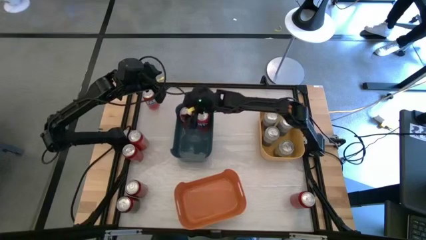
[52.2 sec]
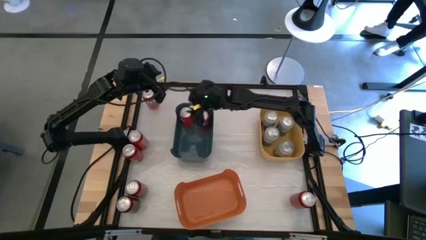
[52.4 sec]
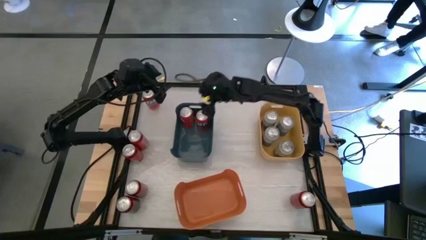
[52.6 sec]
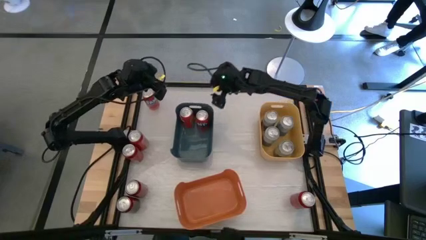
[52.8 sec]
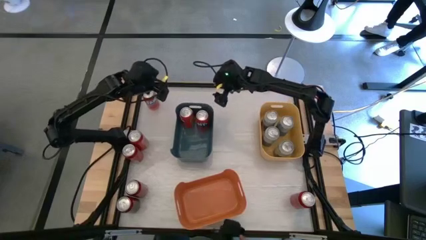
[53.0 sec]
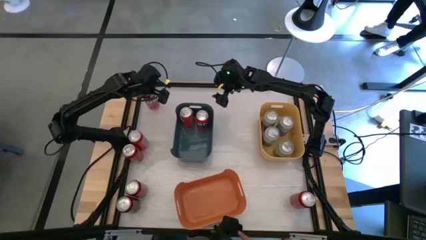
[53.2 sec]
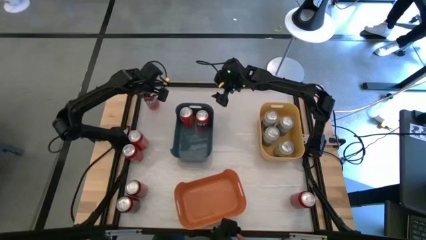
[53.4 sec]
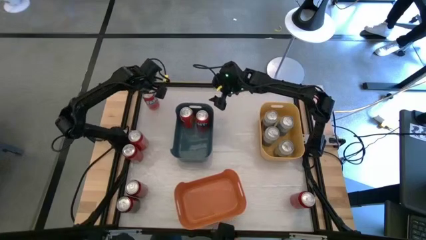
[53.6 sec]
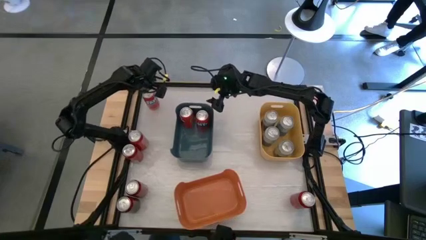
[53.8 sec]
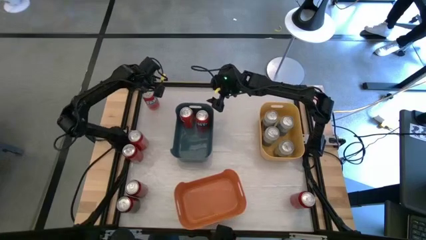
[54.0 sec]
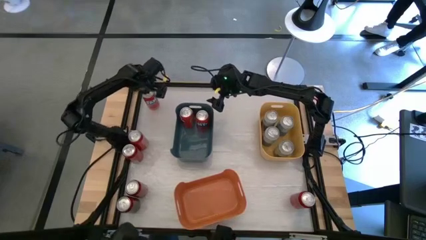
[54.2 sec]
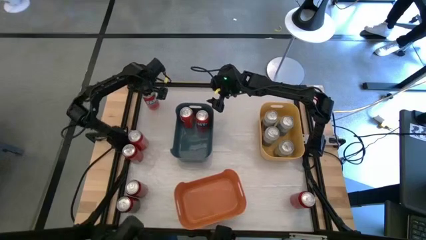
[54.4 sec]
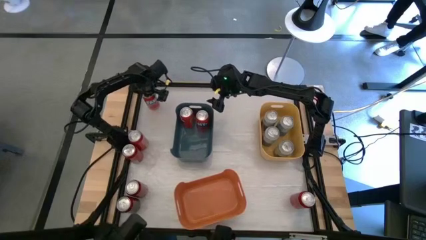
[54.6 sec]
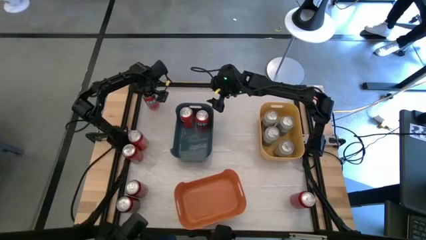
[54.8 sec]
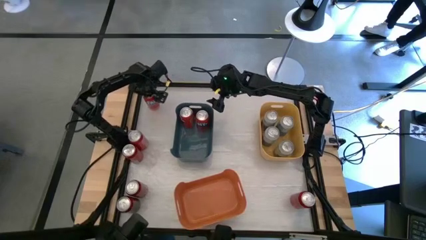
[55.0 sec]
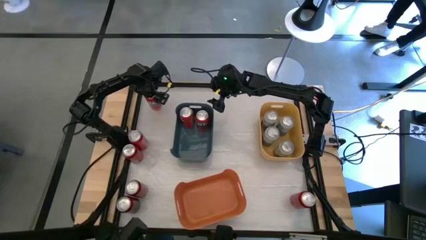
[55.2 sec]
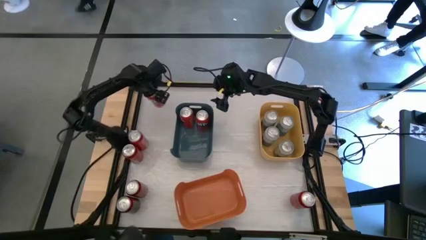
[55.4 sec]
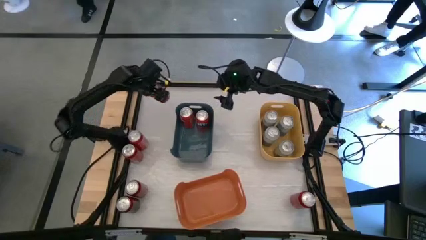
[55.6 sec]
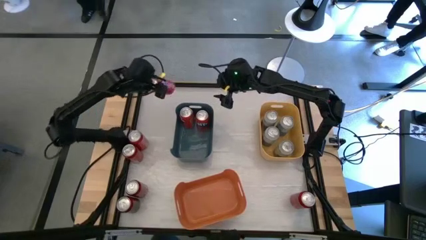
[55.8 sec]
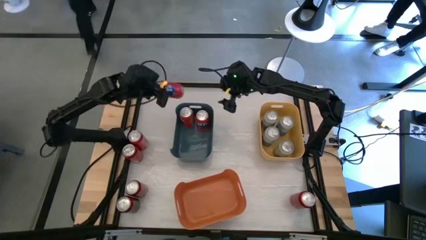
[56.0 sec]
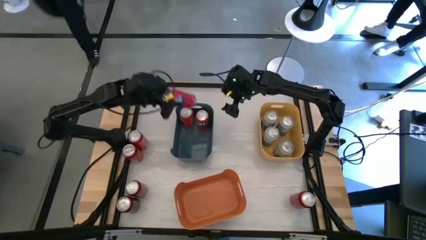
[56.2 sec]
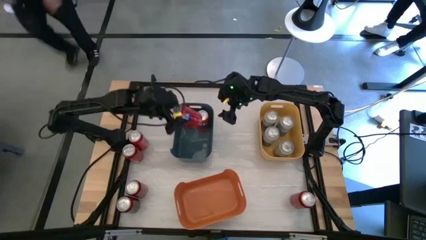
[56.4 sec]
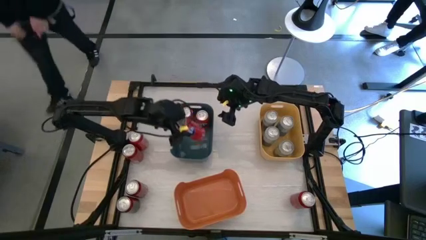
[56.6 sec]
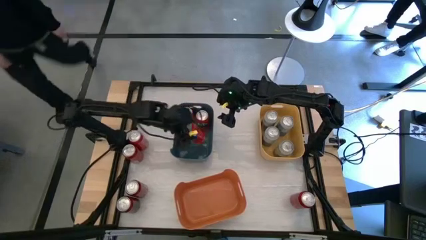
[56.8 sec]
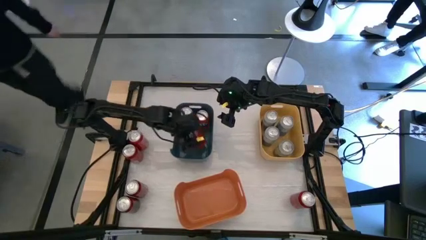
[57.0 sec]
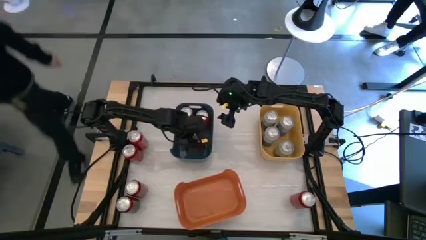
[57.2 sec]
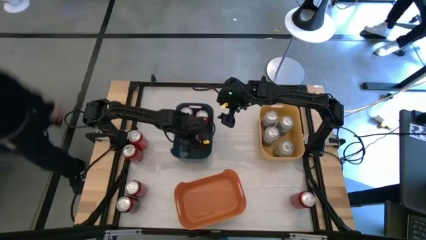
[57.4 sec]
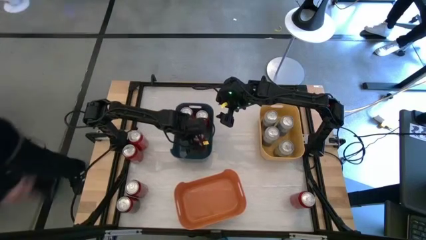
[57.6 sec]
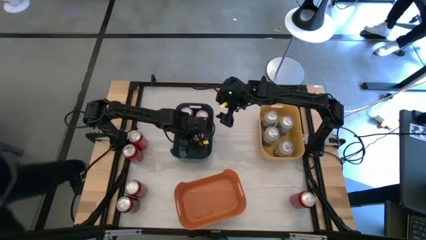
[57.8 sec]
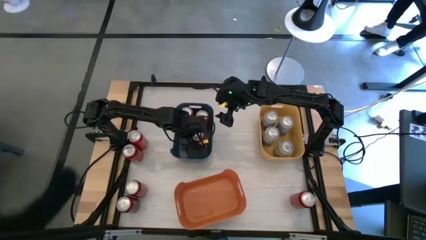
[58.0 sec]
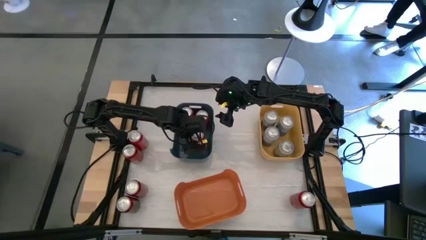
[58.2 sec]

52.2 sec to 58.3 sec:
Task: Sort soda cans
Put the top orange soda can into the blue bin

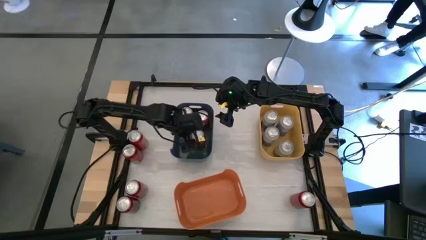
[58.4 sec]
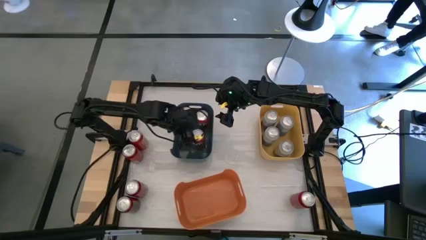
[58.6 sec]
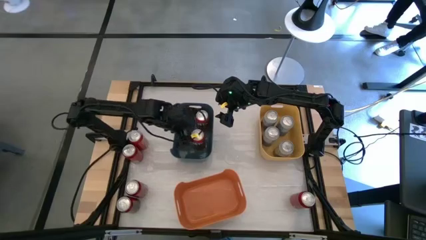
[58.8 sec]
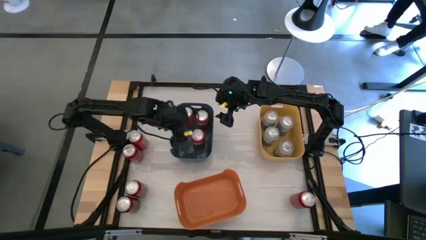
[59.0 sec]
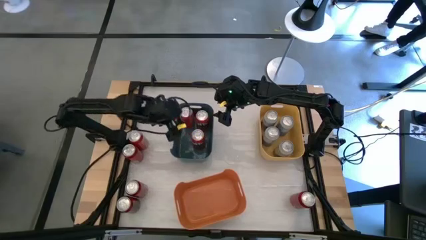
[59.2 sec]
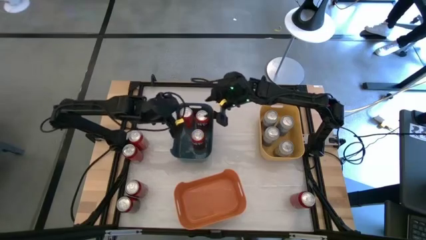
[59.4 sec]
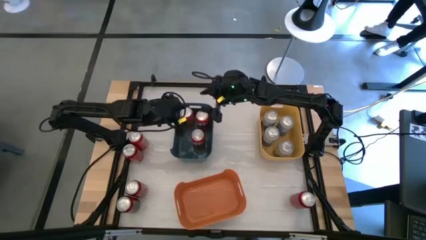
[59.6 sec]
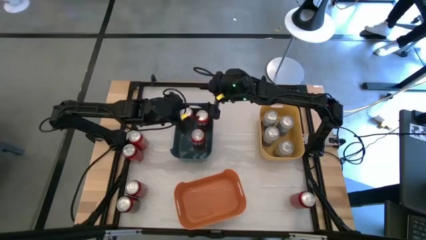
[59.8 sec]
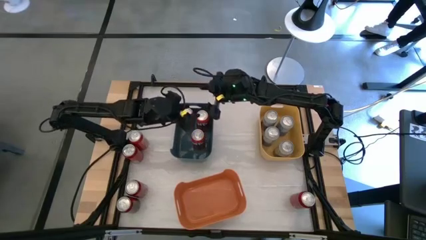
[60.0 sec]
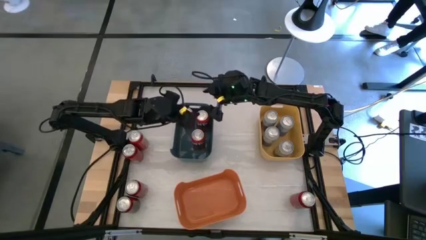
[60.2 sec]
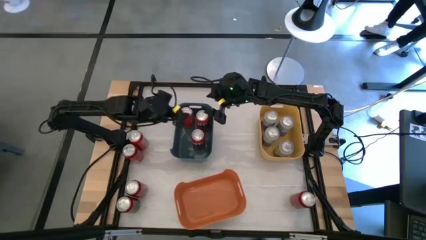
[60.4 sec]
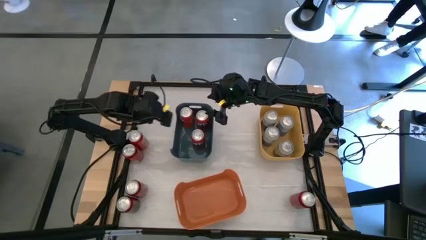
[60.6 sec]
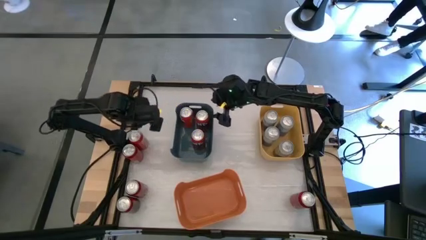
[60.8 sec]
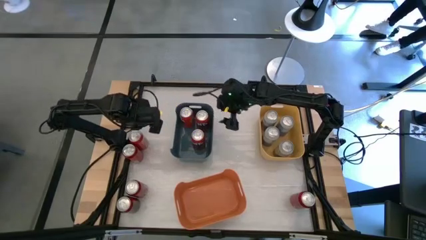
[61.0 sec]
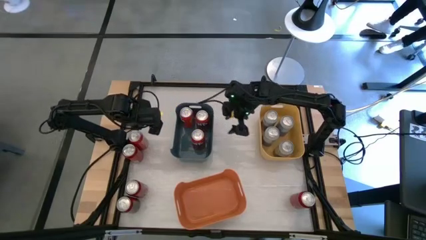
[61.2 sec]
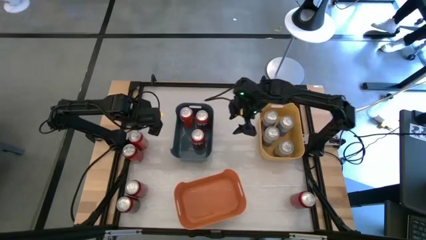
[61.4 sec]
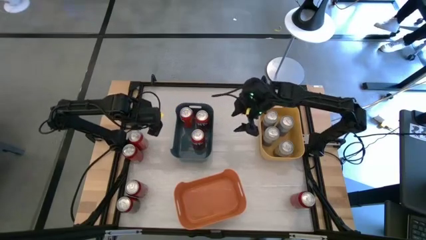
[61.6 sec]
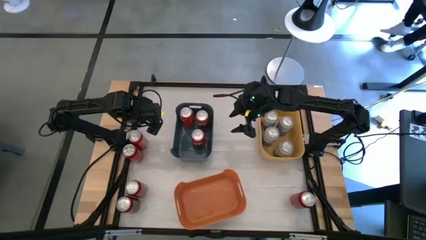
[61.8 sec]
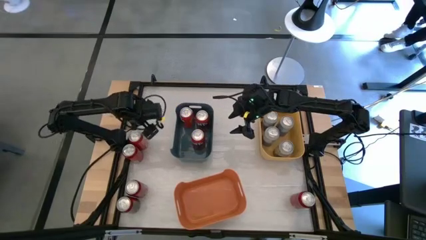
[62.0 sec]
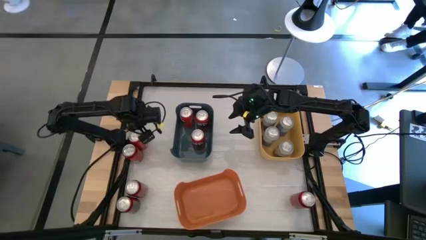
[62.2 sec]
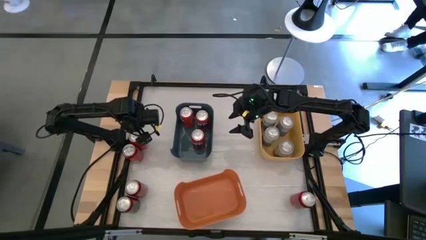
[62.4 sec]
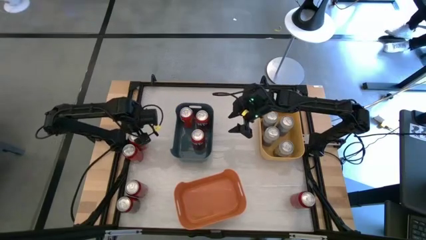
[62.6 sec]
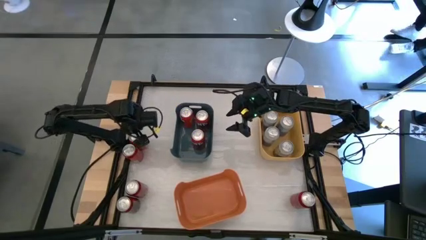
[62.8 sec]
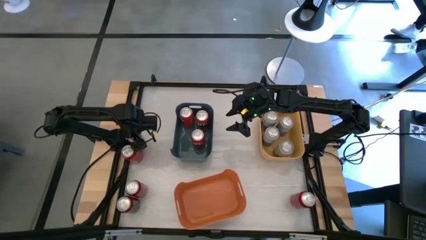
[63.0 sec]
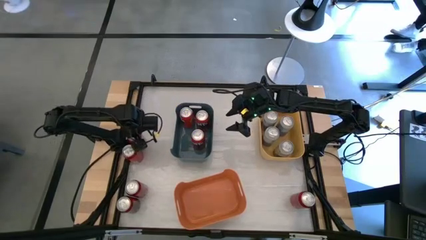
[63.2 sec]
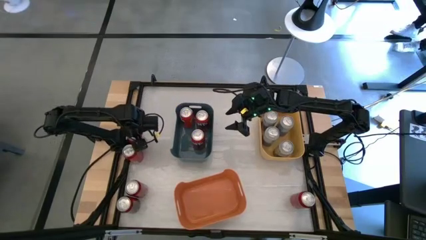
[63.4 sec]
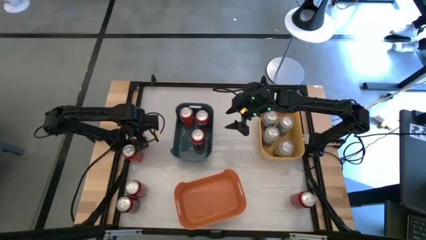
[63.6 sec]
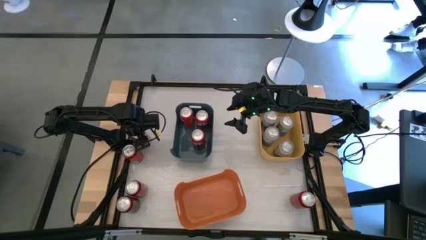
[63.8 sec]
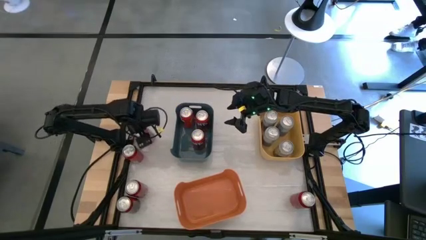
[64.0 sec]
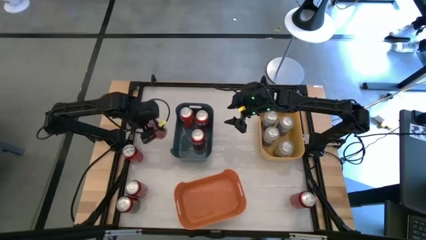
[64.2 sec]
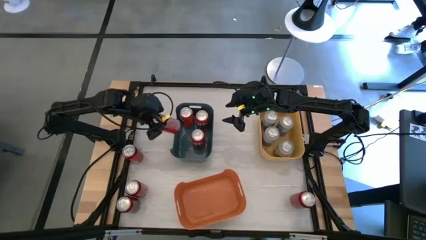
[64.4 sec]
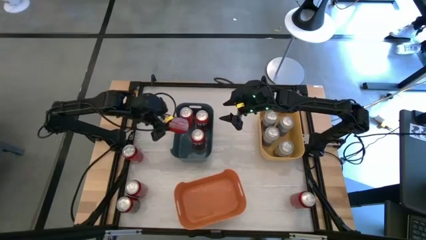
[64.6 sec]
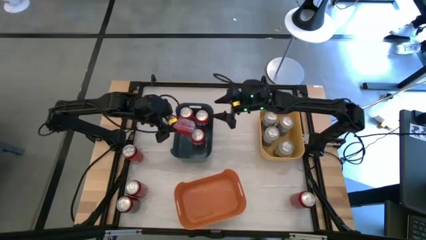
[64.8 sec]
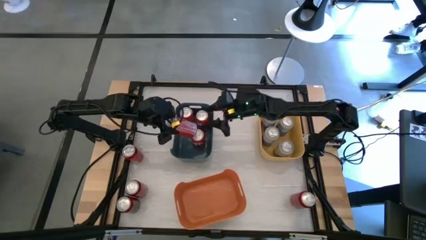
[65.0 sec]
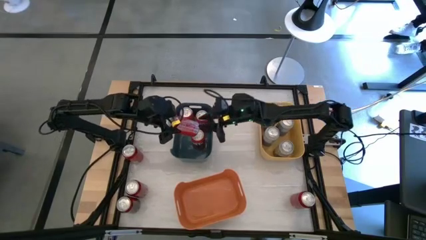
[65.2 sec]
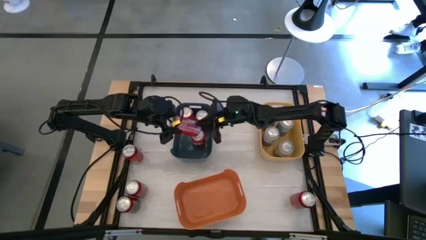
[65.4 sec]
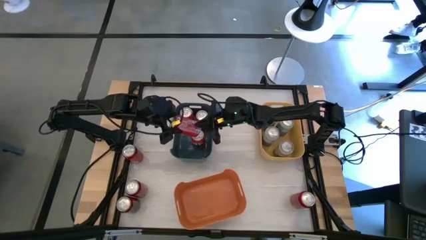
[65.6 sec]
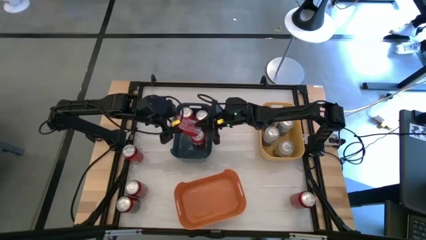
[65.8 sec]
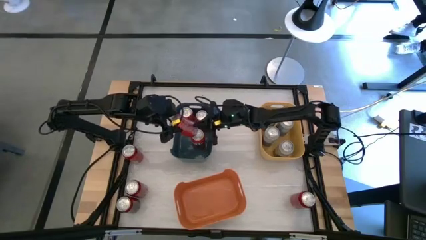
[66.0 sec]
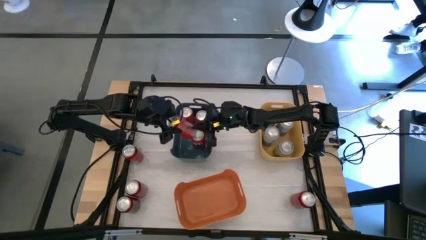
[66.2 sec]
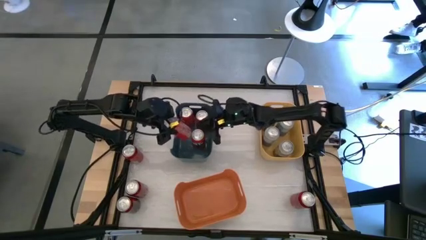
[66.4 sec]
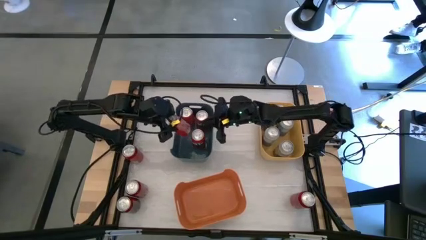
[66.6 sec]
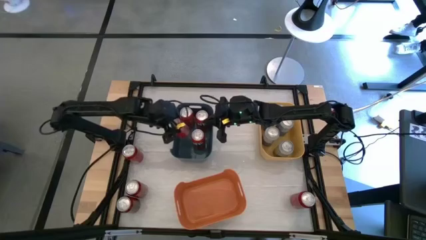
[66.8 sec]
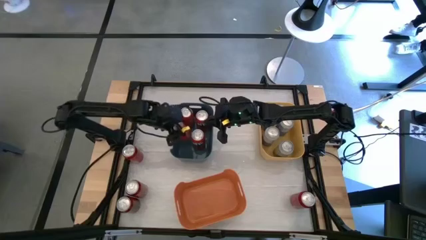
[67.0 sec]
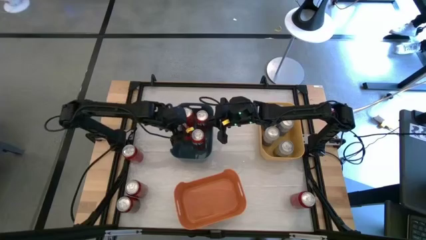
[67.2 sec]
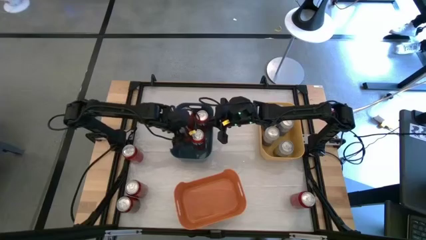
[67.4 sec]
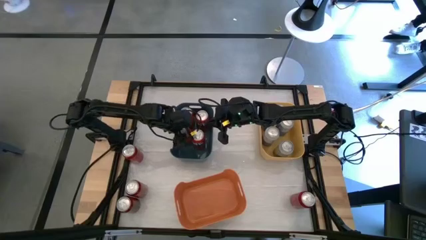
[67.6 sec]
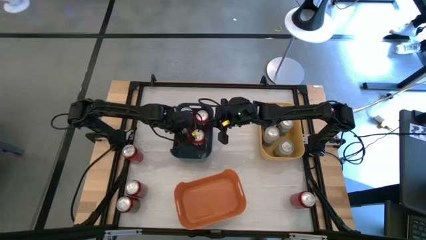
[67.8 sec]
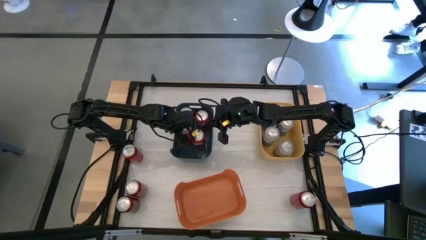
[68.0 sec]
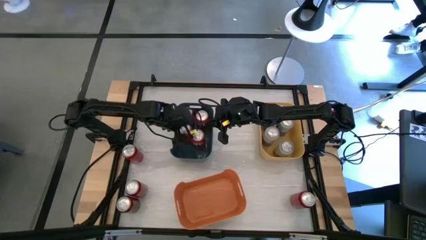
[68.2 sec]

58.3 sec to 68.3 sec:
Put the orange soda can into the blue bin

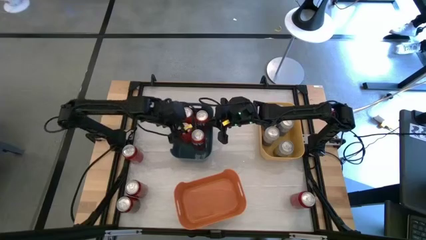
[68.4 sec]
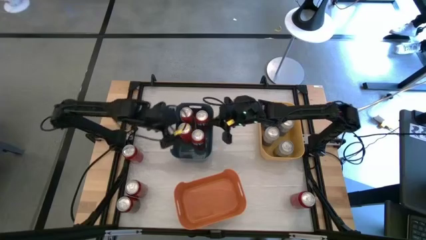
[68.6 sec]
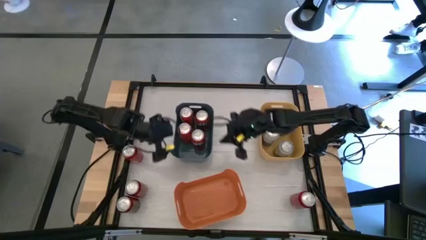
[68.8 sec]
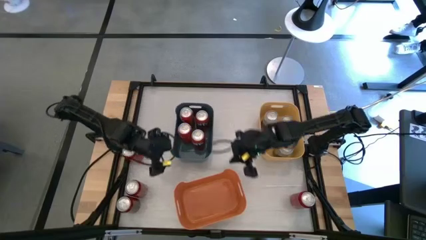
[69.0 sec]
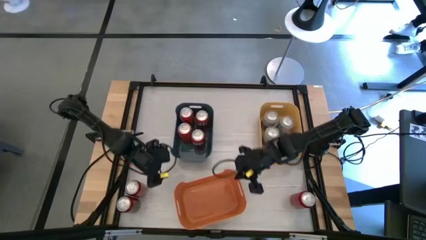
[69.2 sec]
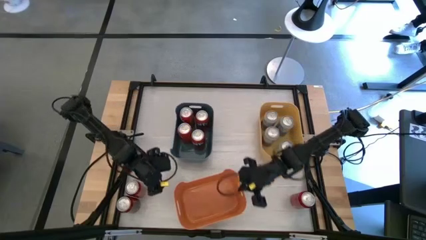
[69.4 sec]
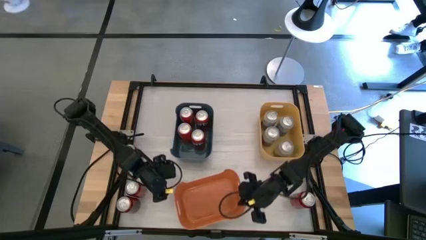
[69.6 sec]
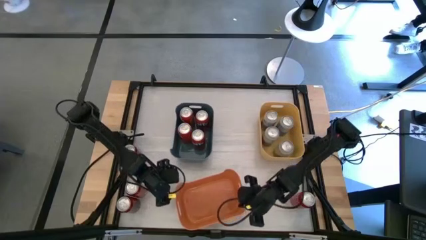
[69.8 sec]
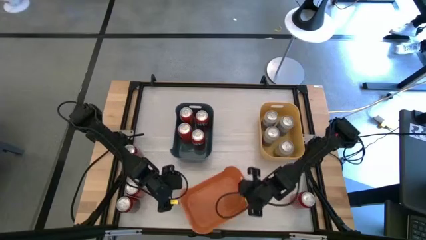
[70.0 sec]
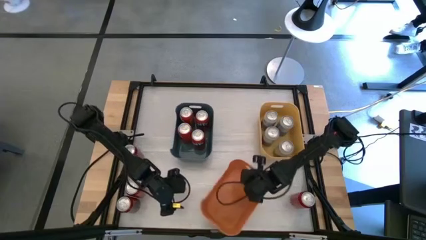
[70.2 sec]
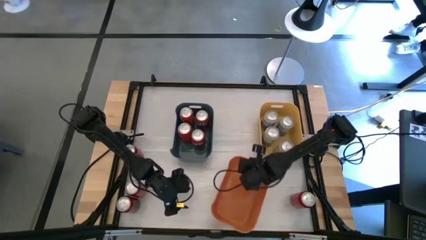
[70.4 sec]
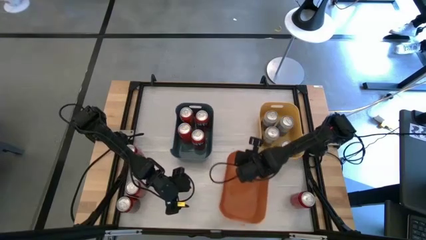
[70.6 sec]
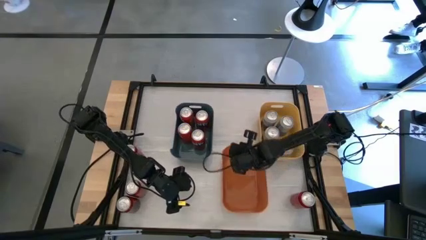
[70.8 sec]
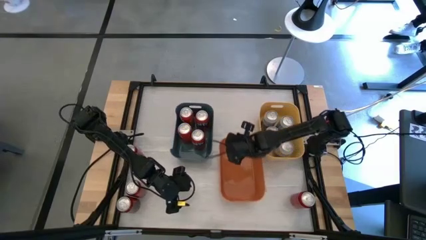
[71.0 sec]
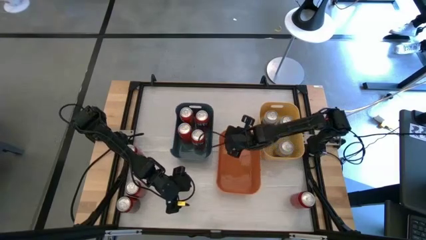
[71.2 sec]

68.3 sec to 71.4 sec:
Move the orange bin from the bottom to the middle of the table
